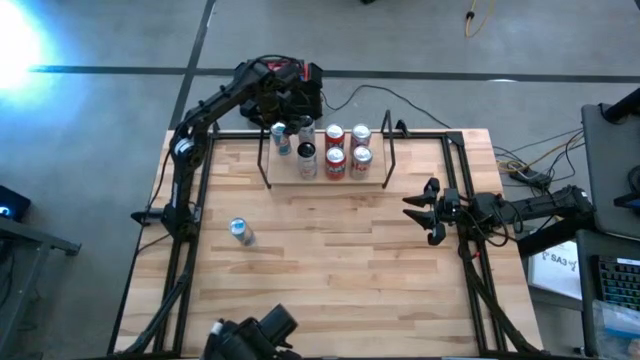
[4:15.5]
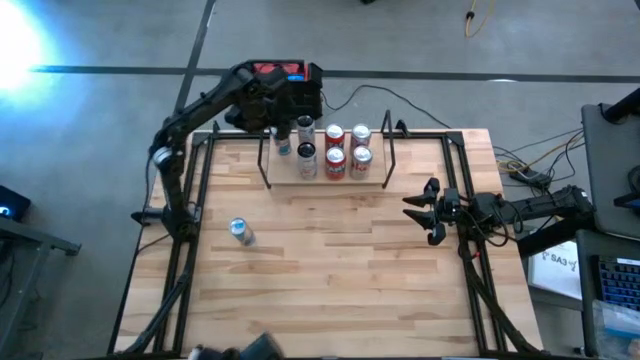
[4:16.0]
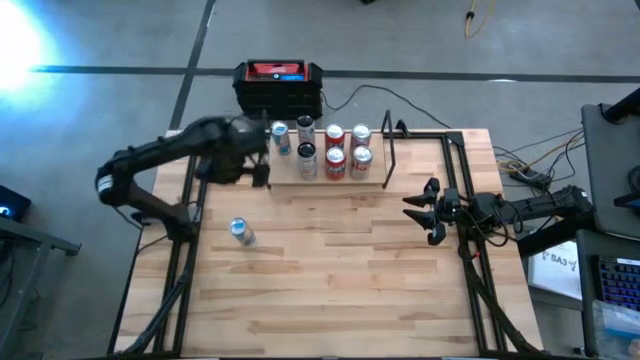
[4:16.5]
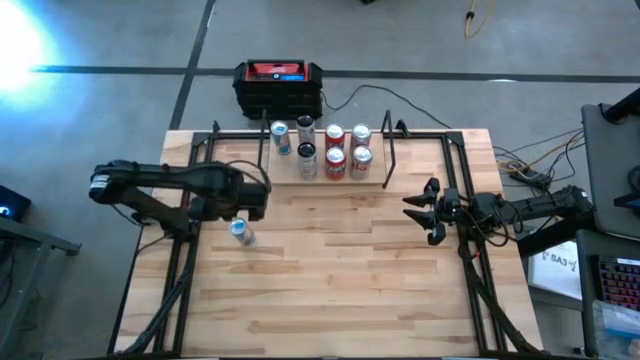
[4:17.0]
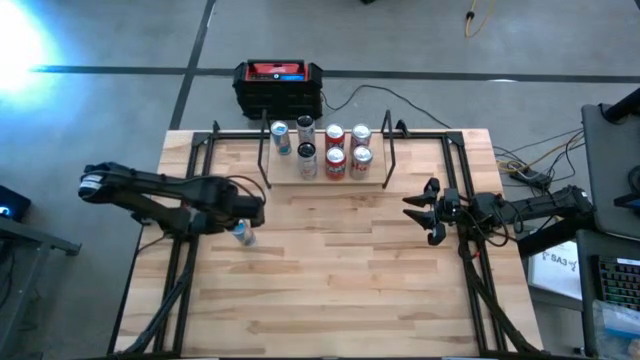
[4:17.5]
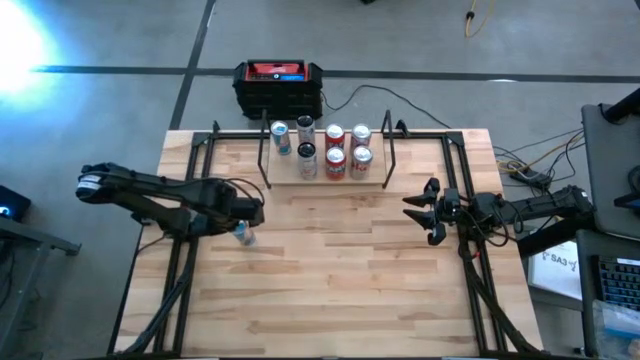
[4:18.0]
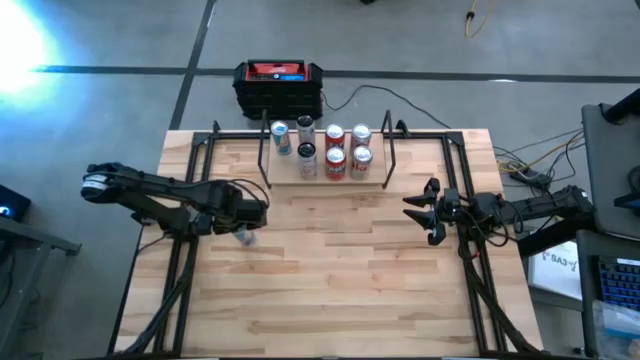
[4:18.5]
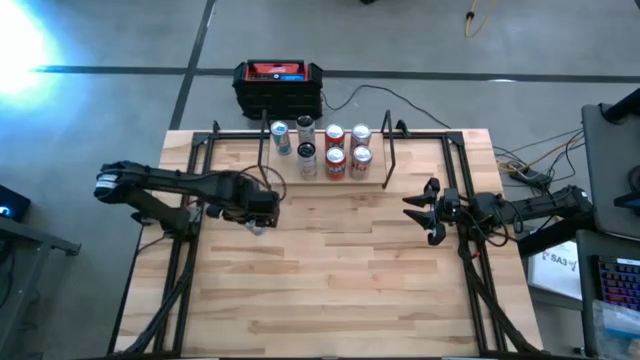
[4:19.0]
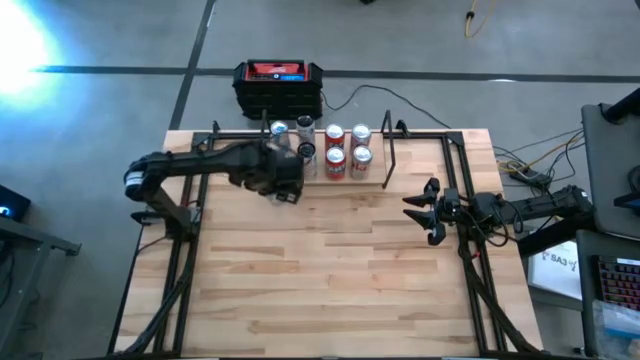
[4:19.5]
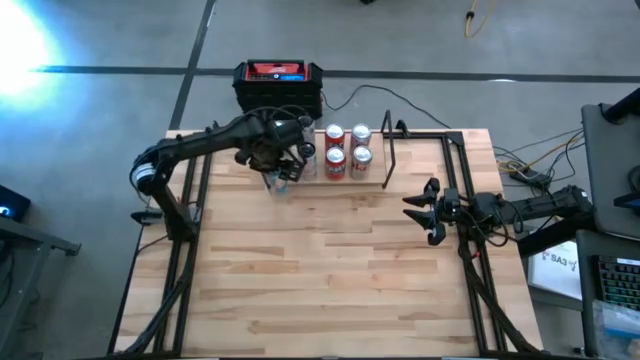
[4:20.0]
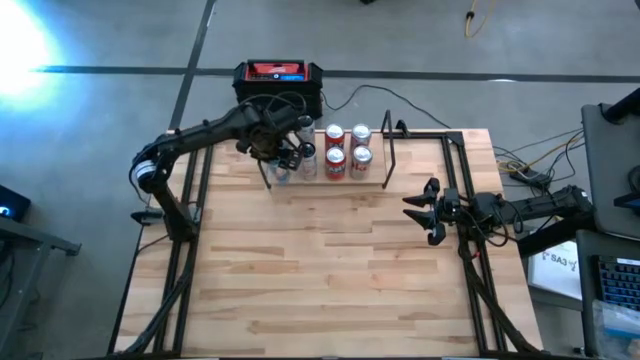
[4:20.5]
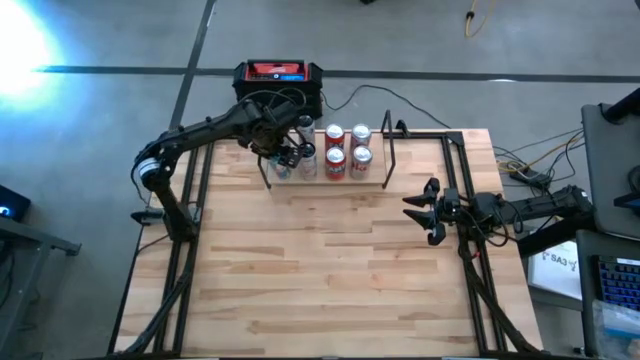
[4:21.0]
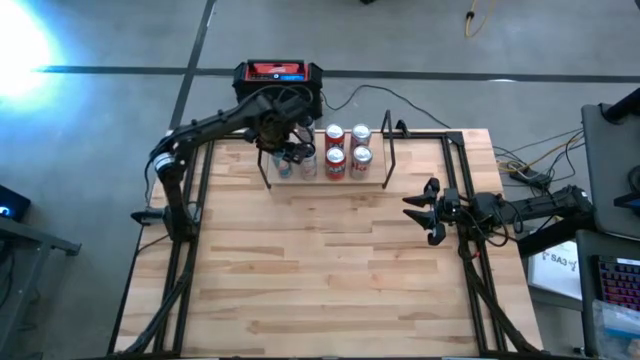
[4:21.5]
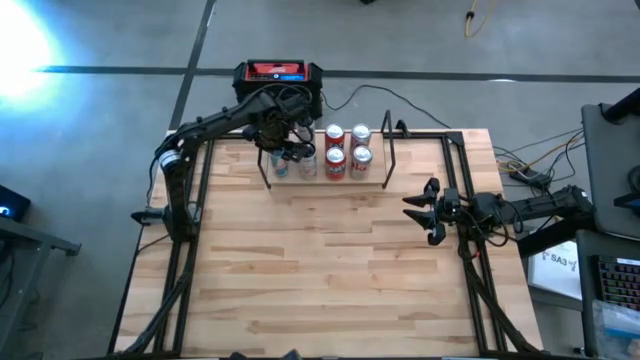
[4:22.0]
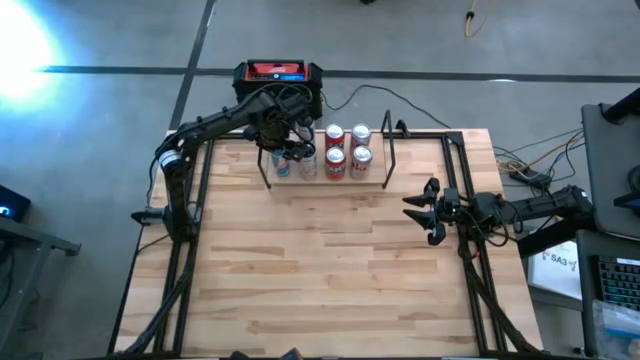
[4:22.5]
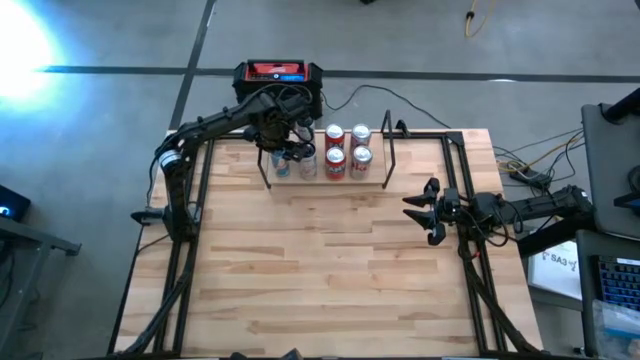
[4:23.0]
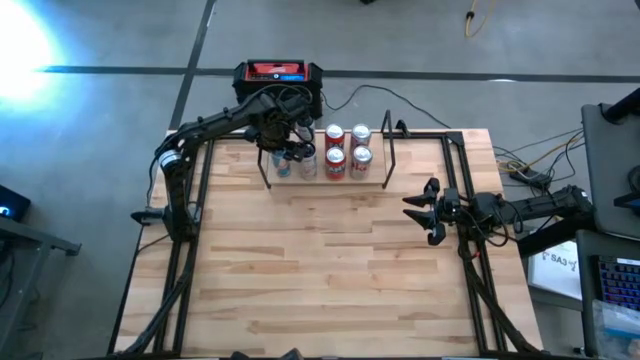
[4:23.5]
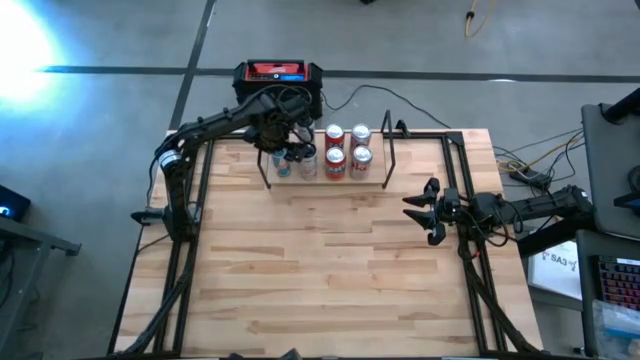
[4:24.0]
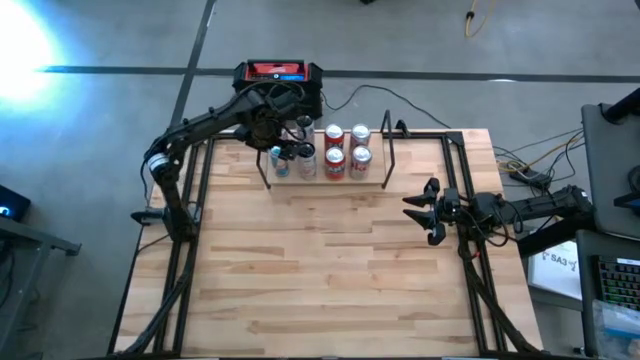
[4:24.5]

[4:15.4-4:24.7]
Task: Place canned beverage on shelf
Put the blue soda can on the shelf aligned with the other blue soda can

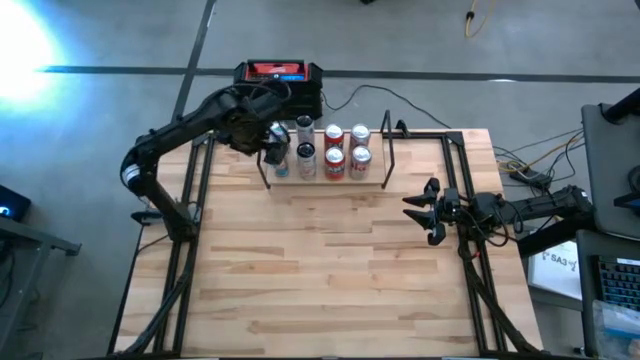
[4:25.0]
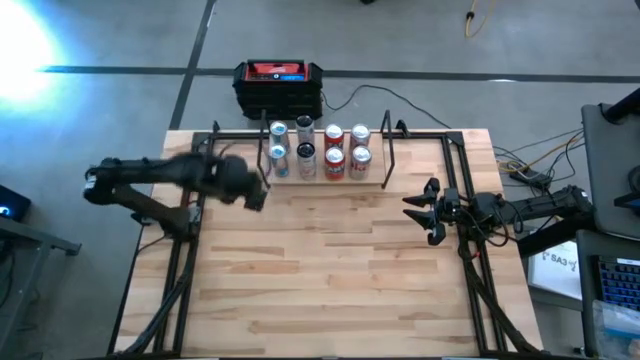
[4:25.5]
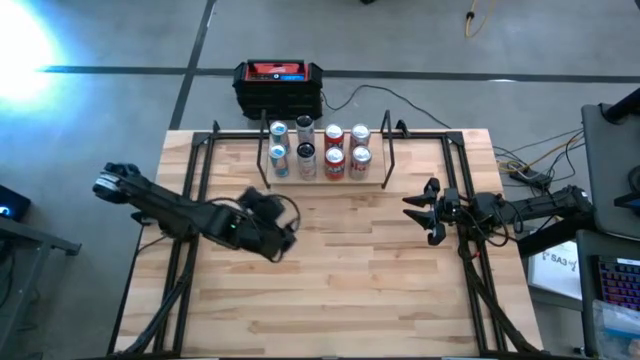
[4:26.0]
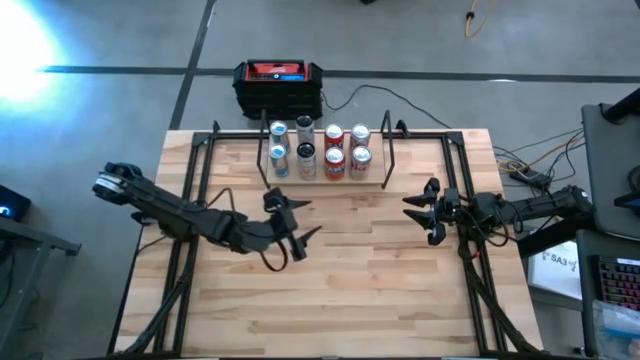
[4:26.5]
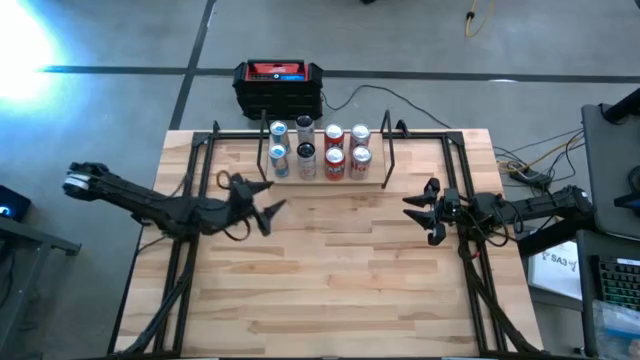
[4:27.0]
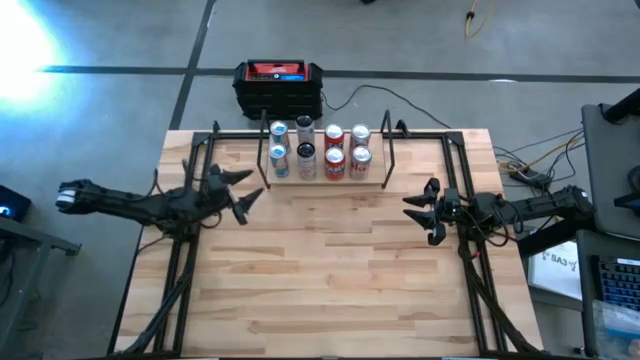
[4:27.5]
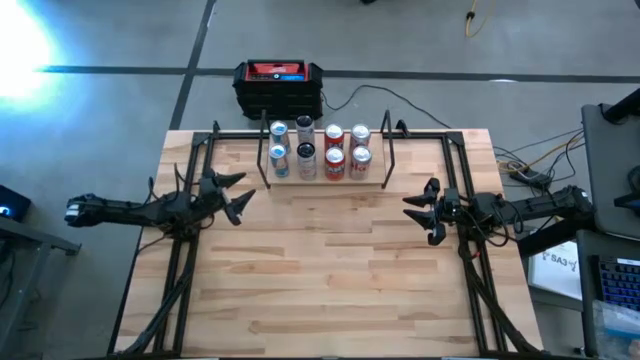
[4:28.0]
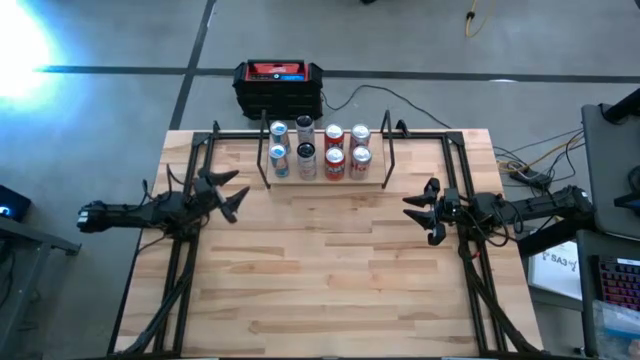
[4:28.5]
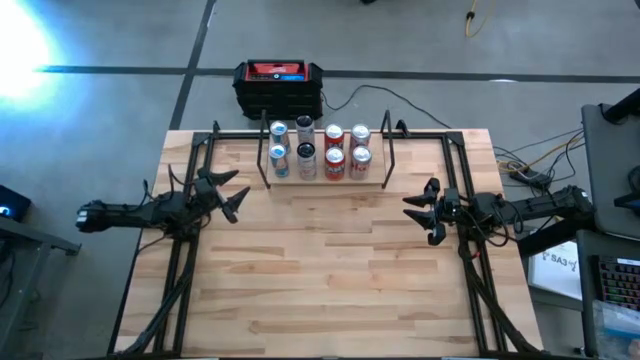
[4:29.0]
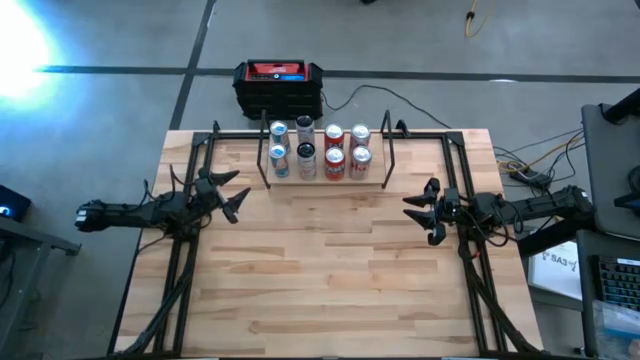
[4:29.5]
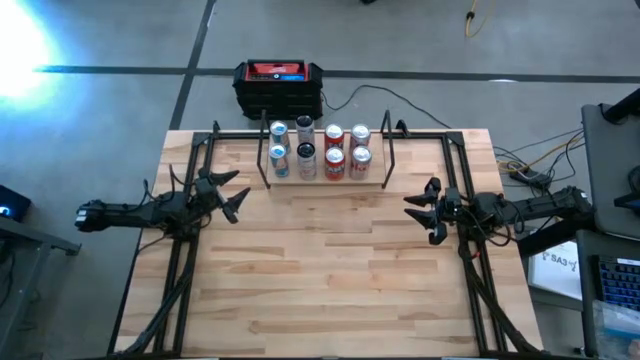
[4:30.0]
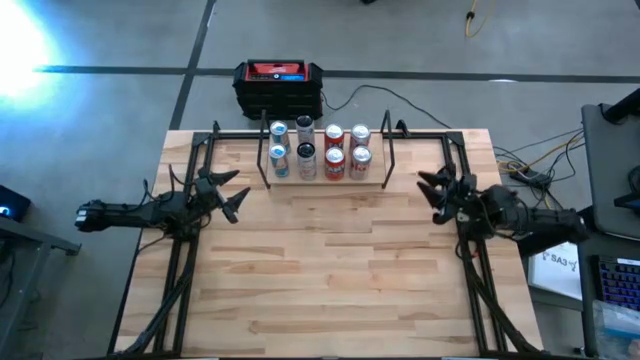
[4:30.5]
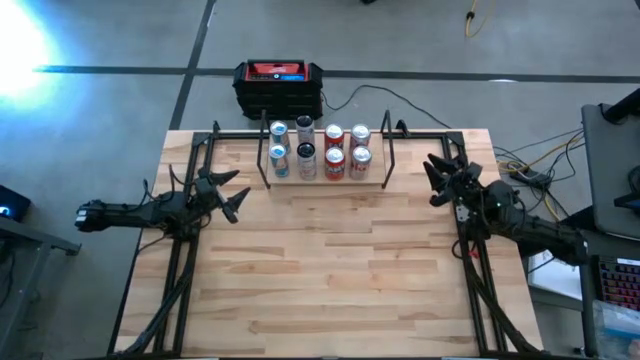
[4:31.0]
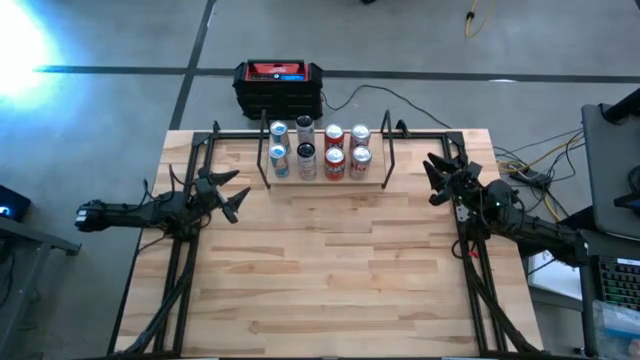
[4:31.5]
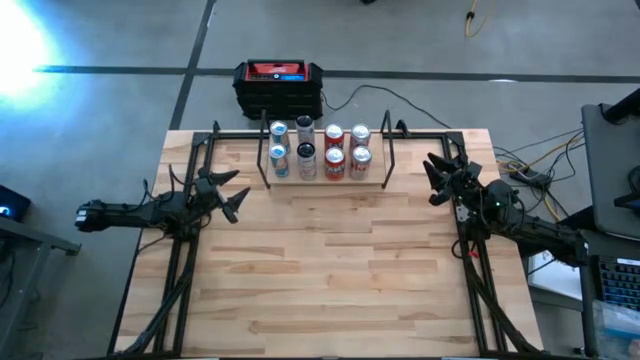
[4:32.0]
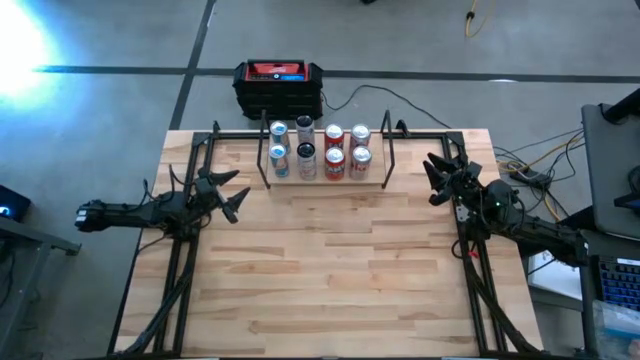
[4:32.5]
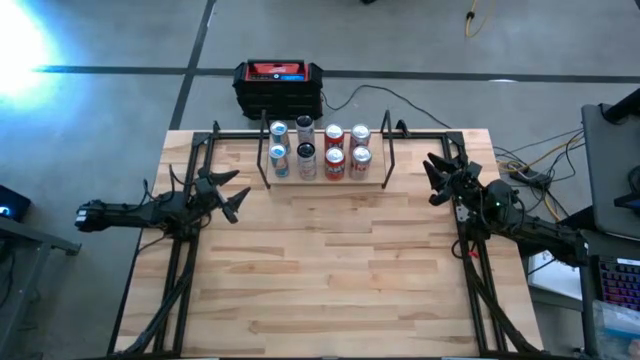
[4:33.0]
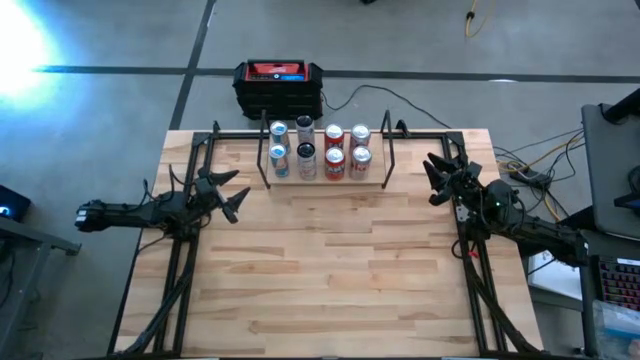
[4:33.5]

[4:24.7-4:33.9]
Return to Home Position
